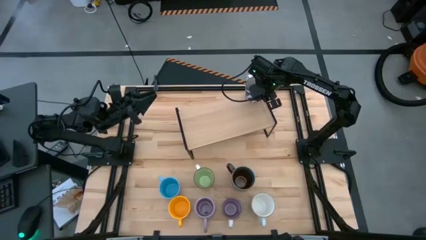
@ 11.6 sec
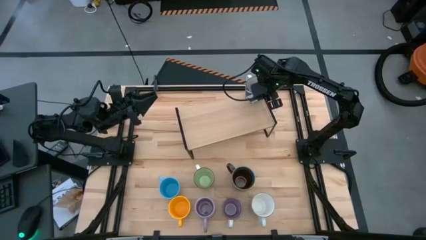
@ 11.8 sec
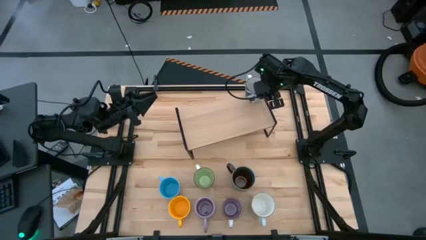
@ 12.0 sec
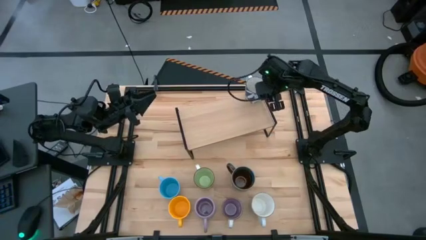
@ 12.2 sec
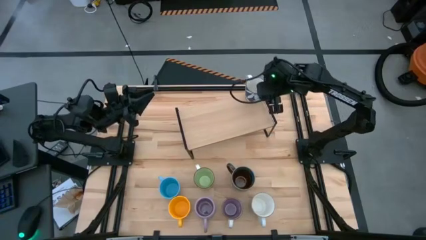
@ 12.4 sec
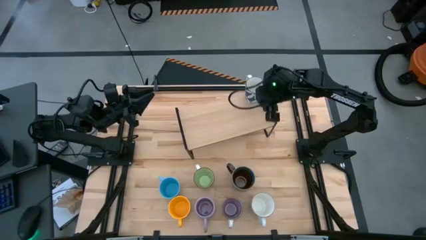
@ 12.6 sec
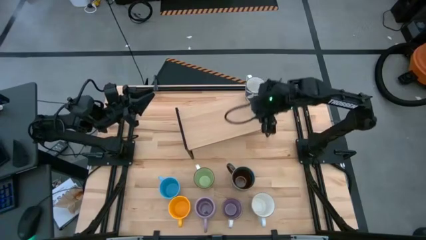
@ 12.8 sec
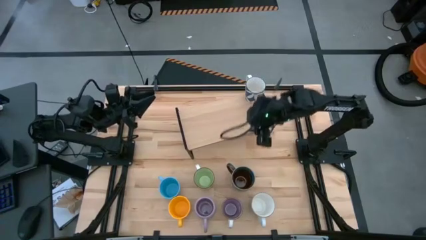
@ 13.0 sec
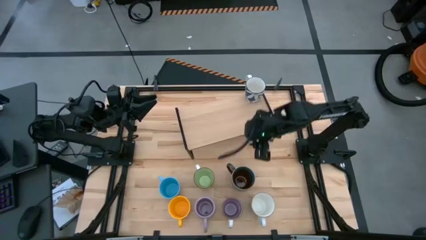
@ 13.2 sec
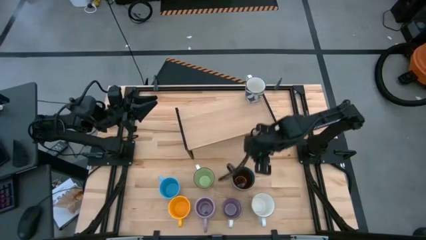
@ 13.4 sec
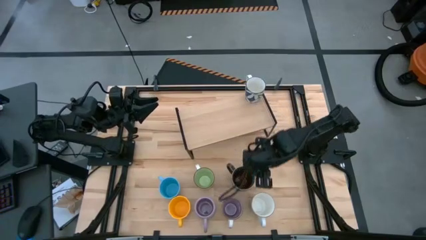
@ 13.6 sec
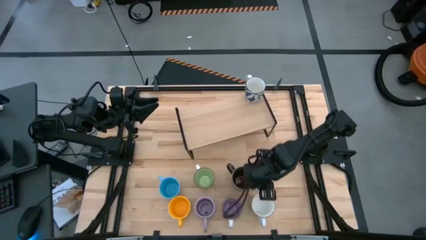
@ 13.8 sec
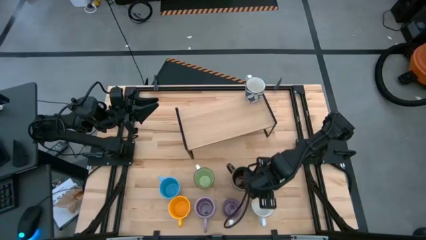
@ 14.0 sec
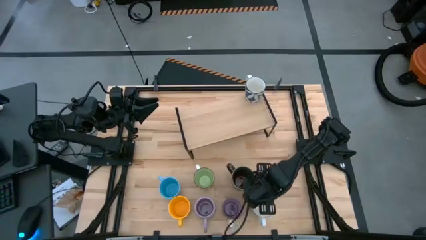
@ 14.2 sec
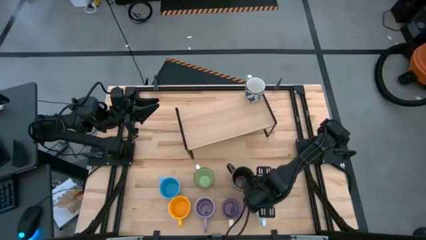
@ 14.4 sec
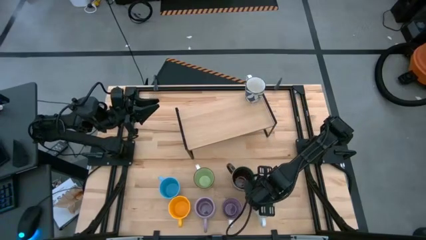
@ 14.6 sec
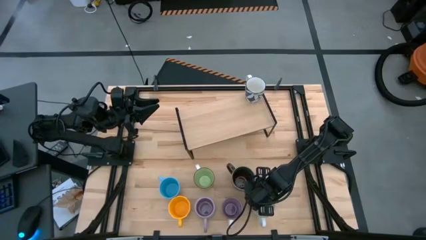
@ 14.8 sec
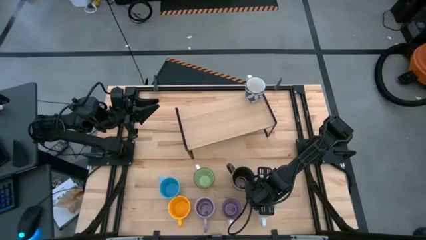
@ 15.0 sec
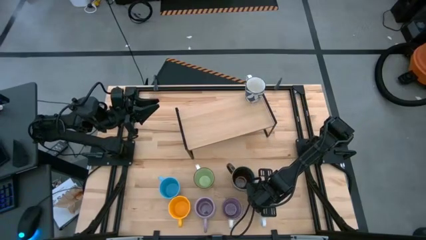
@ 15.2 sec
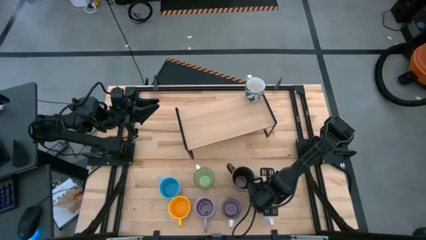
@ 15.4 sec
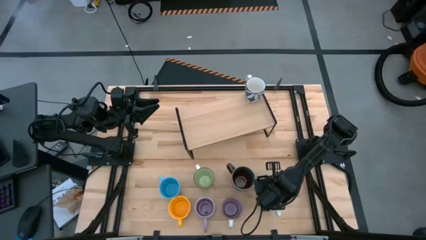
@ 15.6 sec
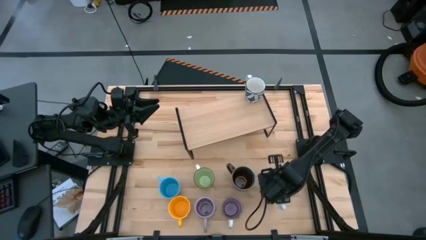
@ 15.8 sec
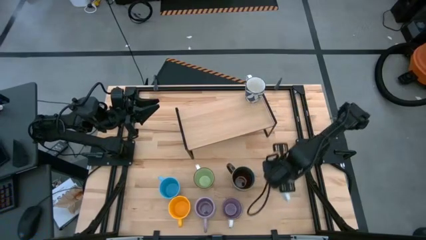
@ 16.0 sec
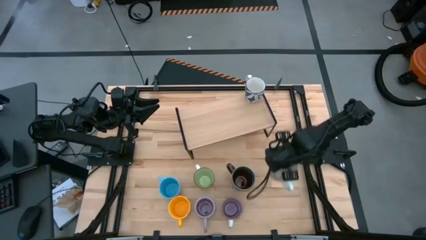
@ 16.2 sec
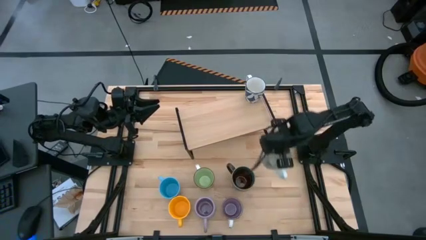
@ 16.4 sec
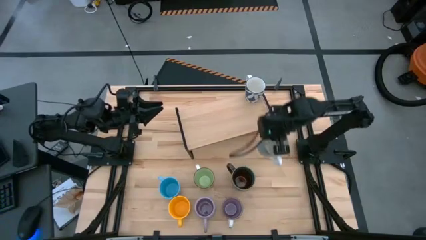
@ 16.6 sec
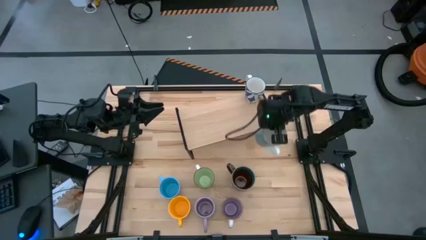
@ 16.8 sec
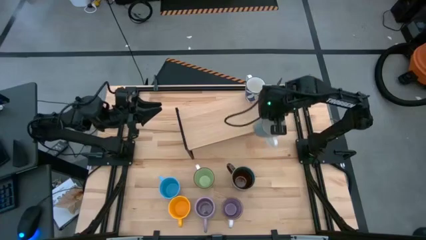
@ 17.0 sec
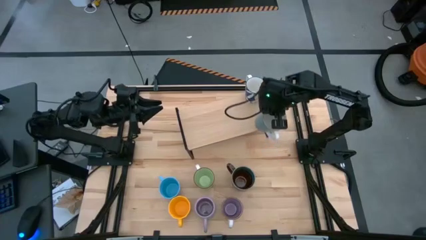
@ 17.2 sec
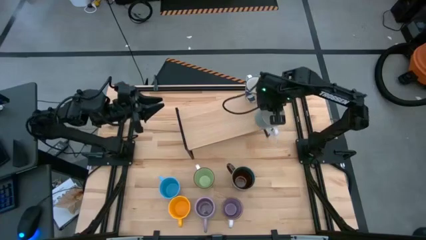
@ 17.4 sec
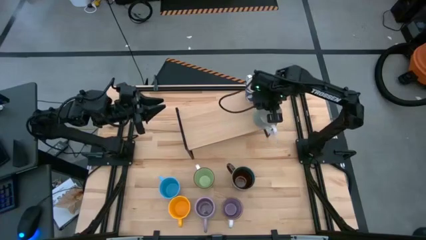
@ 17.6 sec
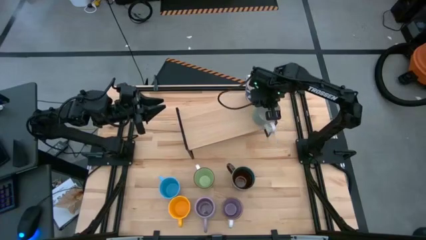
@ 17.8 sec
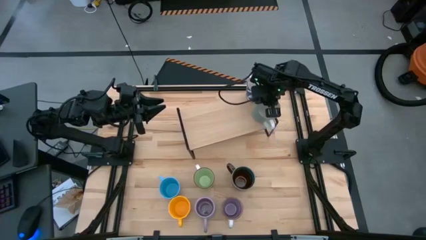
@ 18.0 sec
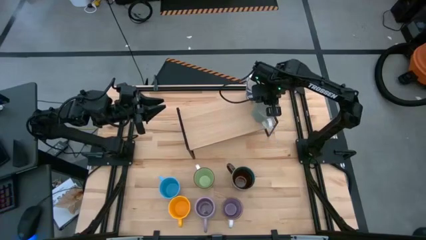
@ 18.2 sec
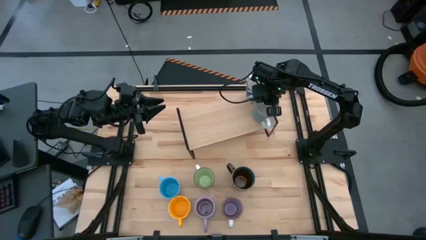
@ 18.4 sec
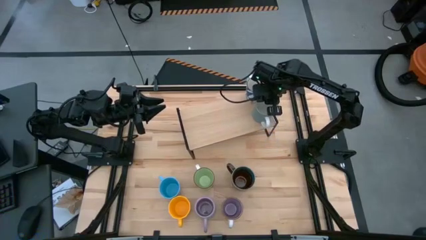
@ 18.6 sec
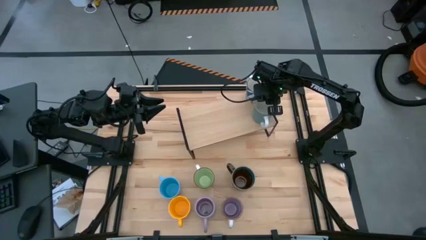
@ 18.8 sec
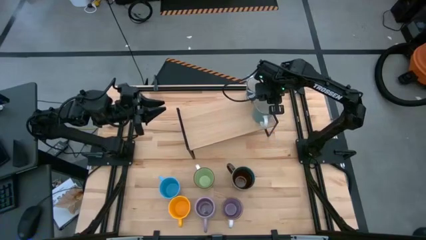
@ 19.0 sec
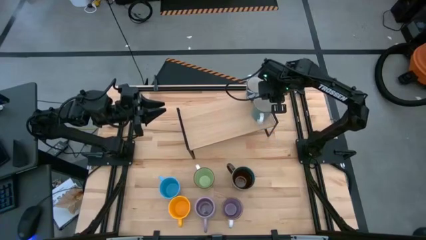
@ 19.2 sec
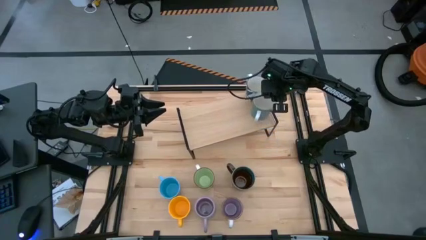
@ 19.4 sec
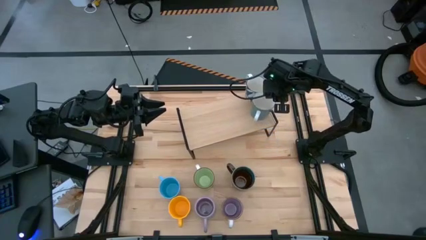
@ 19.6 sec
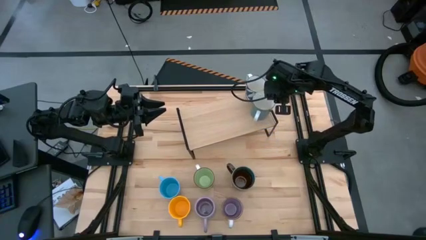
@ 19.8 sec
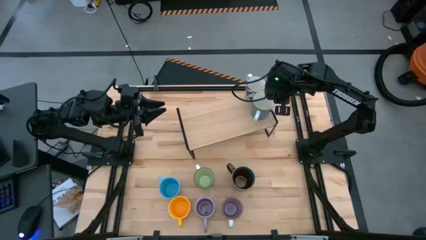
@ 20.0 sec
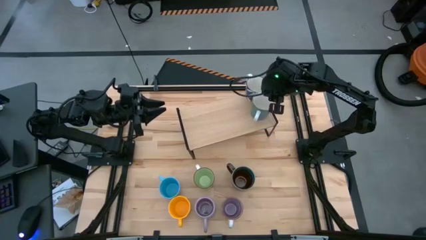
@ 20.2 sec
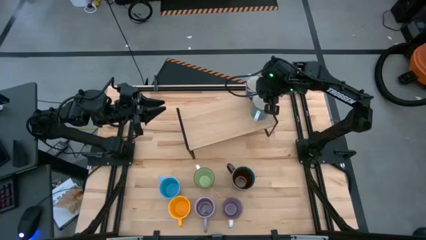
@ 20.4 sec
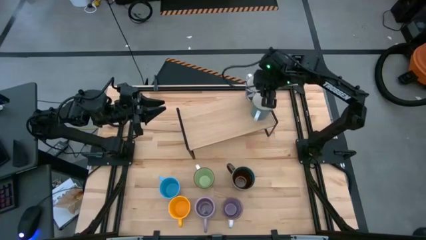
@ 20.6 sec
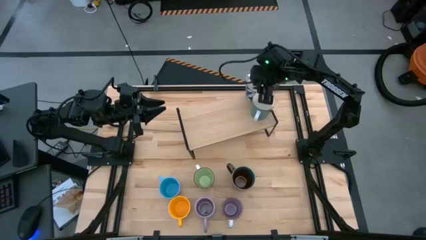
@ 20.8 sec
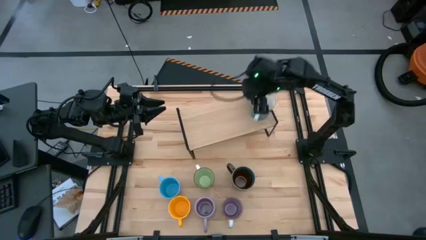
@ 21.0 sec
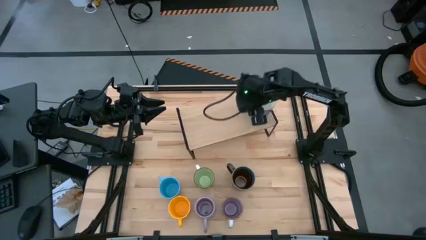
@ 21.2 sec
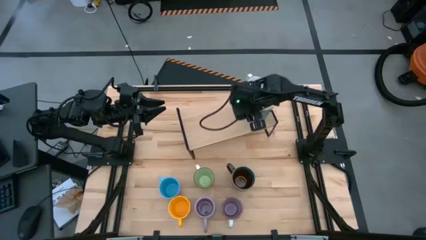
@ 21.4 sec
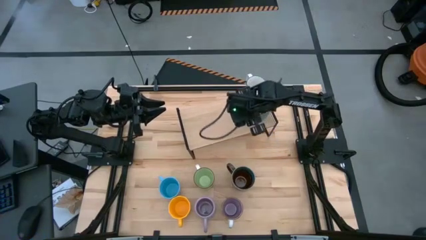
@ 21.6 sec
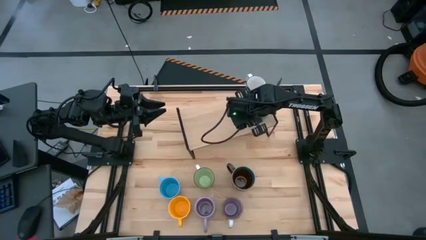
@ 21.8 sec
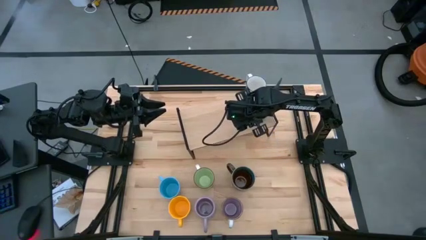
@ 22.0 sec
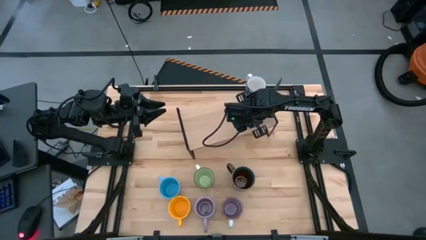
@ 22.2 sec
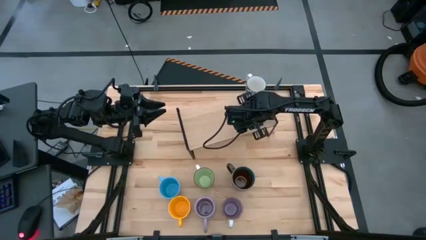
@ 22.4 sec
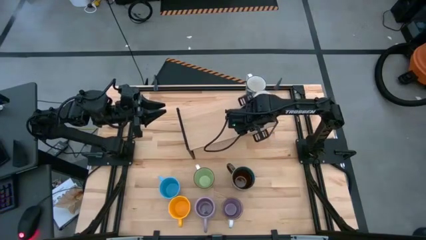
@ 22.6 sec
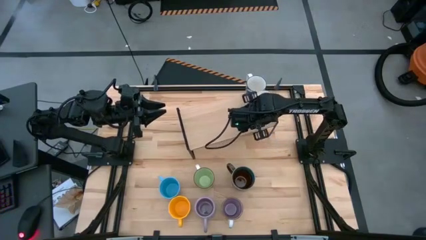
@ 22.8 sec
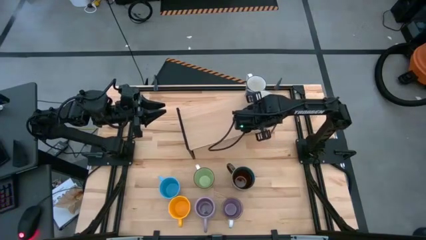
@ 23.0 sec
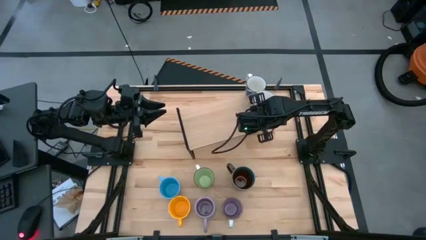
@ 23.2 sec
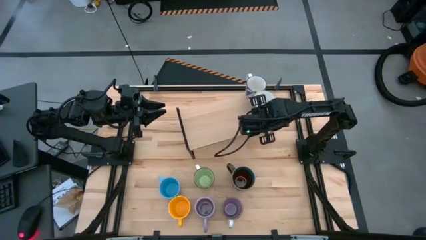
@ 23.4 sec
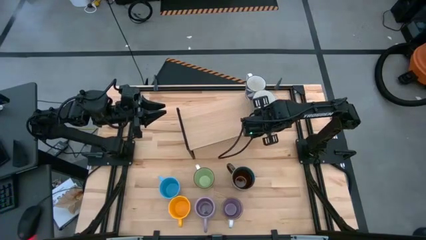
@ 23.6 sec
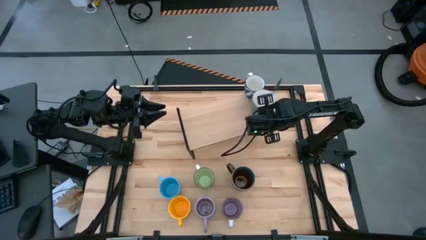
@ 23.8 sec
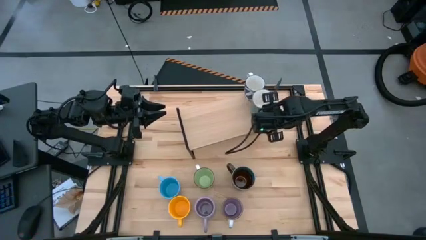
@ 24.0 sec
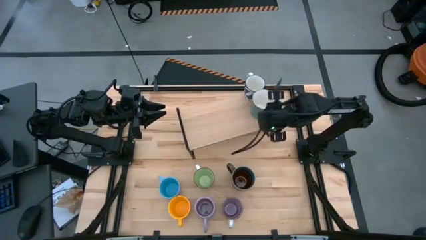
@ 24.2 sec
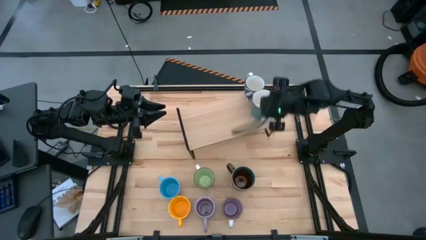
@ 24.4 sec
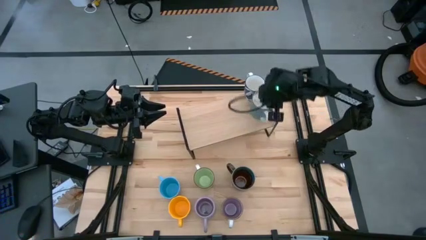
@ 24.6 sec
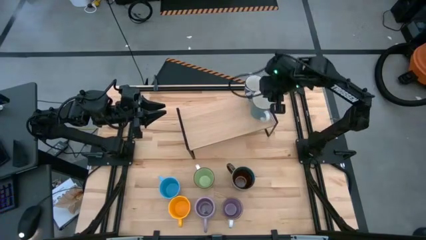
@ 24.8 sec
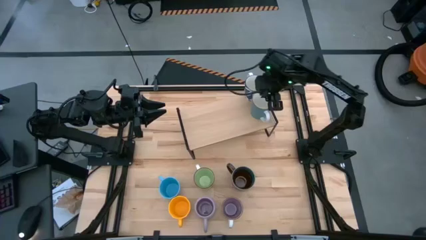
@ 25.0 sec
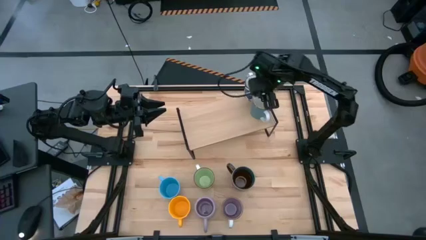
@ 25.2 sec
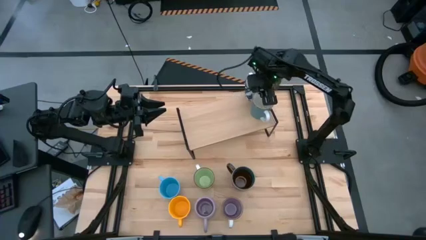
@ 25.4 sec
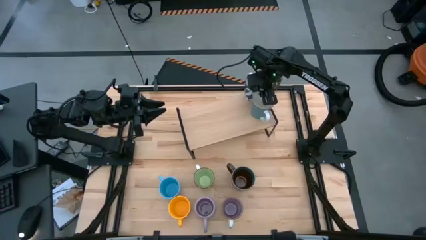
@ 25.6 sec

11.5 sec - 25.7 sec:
Task: Place coffee mugs
Put the light blue mug on the shelf

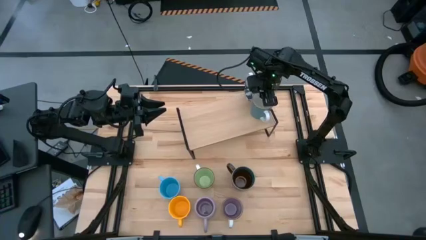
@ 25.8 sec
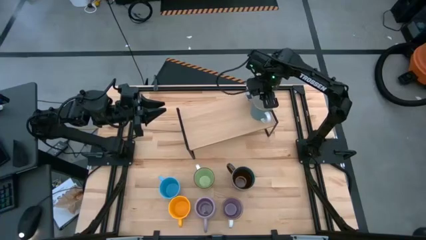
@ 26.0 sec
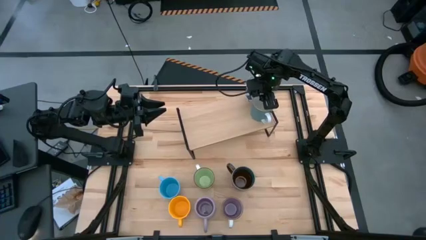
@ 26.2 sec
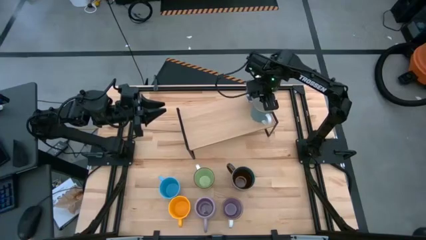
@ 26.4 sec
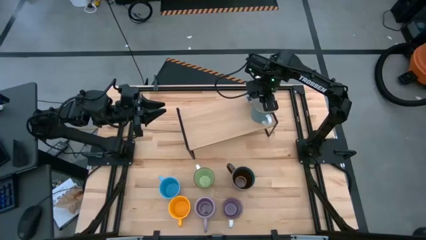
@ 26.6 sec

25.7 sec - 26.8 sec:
Adjust the blue patterned mug
